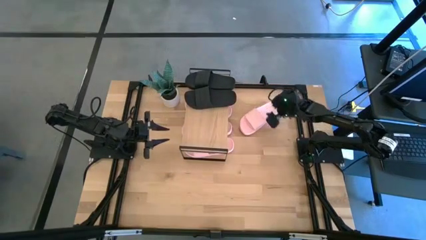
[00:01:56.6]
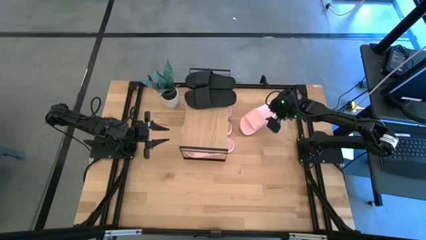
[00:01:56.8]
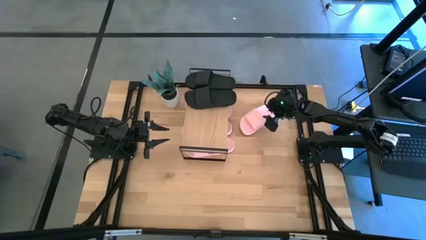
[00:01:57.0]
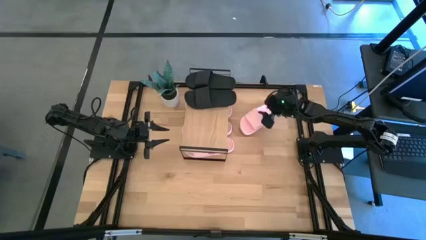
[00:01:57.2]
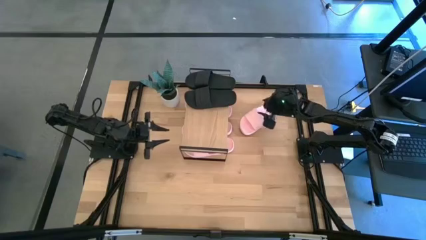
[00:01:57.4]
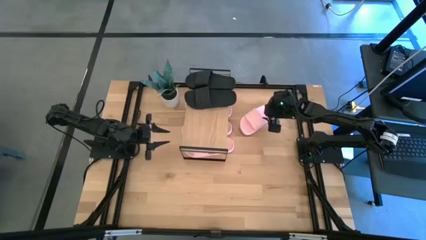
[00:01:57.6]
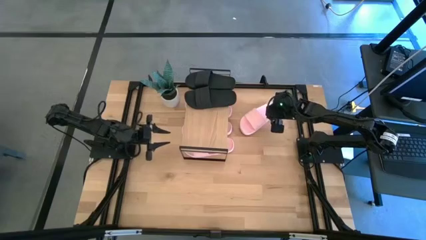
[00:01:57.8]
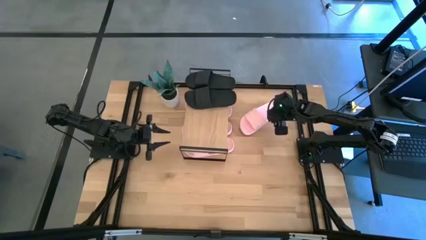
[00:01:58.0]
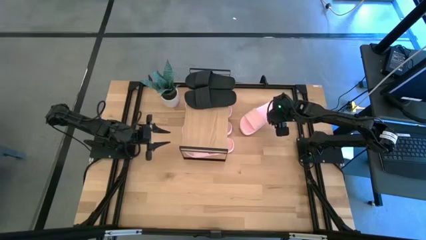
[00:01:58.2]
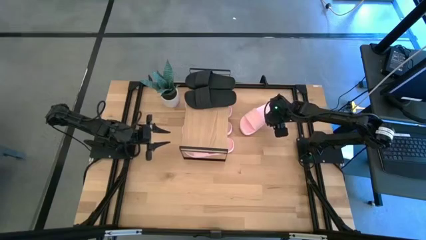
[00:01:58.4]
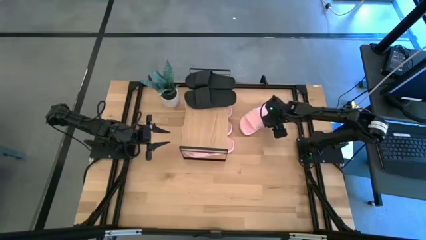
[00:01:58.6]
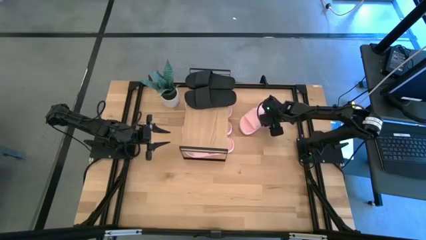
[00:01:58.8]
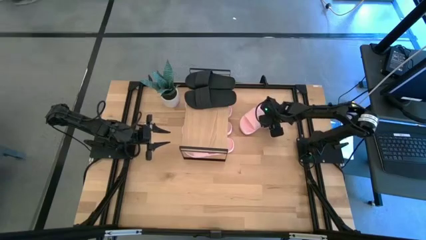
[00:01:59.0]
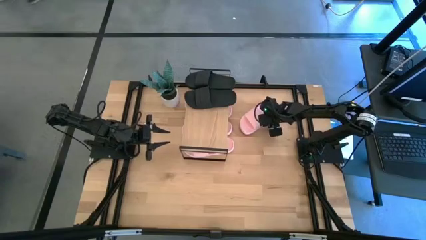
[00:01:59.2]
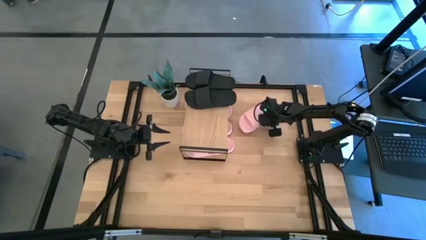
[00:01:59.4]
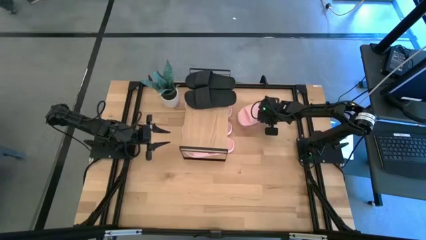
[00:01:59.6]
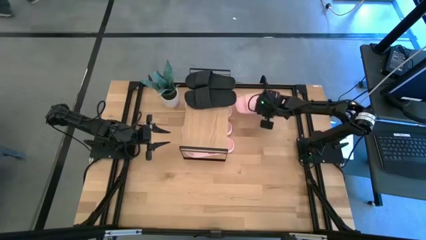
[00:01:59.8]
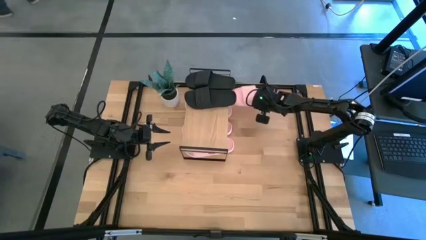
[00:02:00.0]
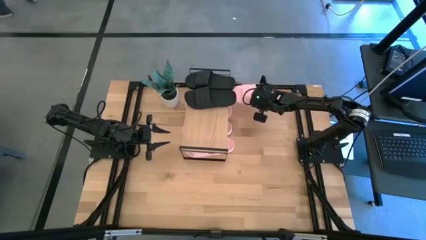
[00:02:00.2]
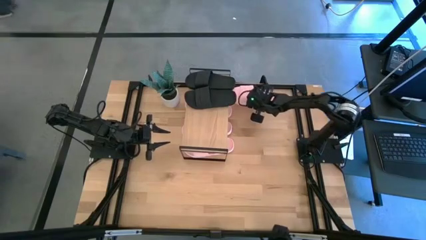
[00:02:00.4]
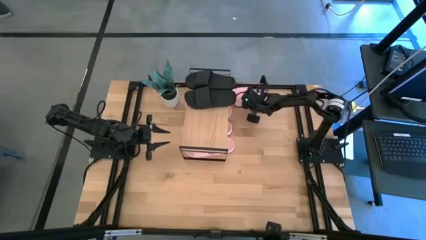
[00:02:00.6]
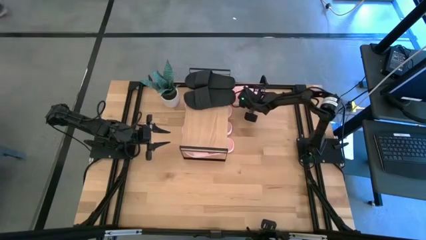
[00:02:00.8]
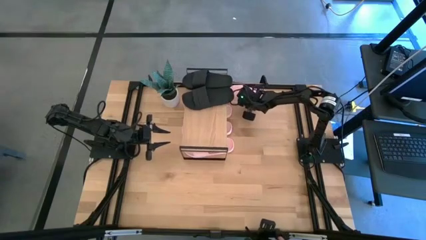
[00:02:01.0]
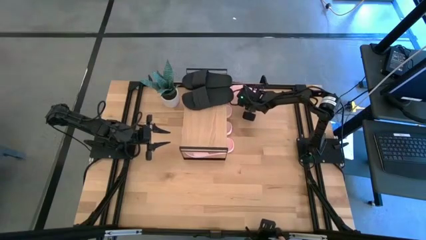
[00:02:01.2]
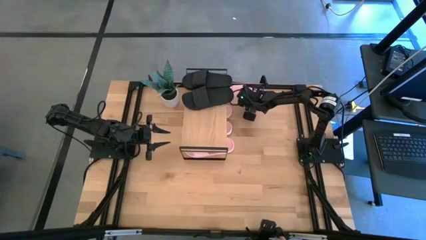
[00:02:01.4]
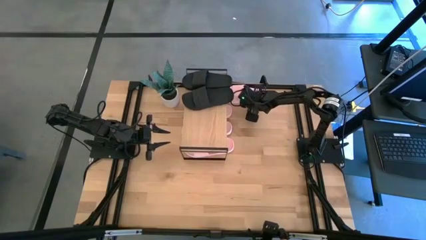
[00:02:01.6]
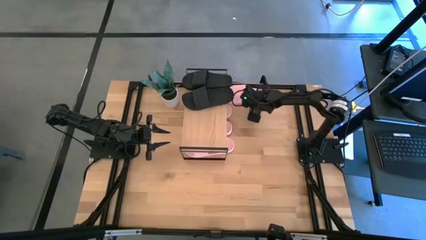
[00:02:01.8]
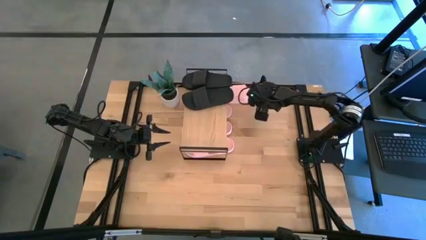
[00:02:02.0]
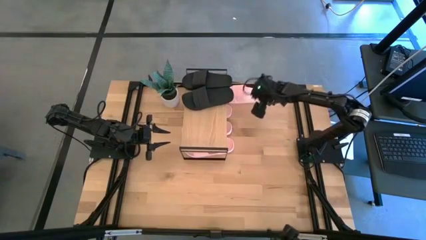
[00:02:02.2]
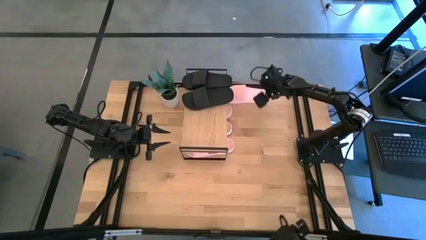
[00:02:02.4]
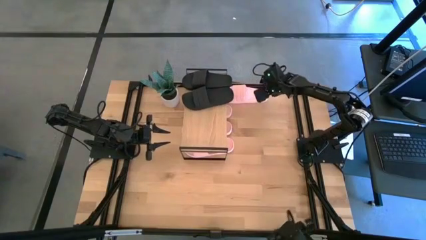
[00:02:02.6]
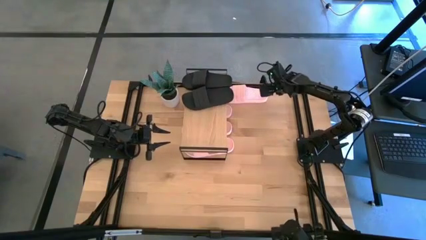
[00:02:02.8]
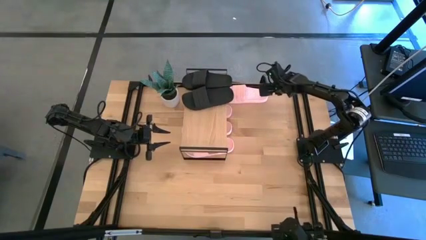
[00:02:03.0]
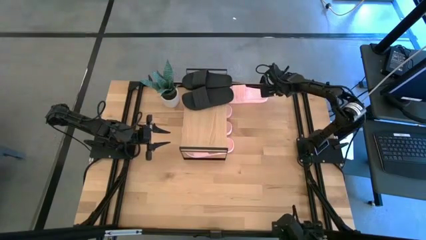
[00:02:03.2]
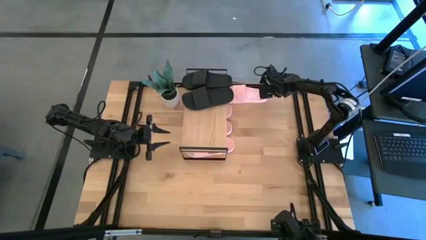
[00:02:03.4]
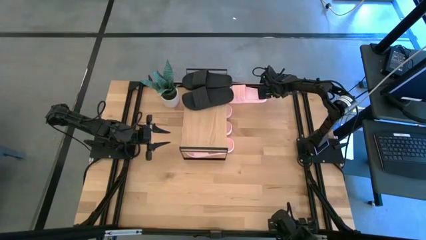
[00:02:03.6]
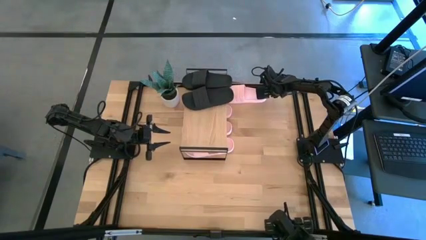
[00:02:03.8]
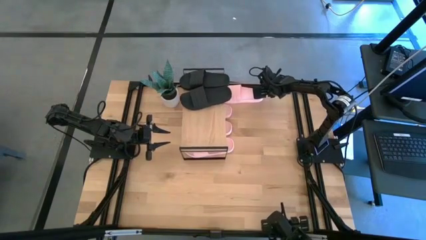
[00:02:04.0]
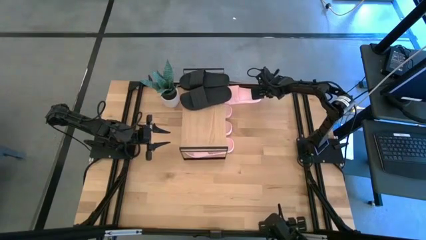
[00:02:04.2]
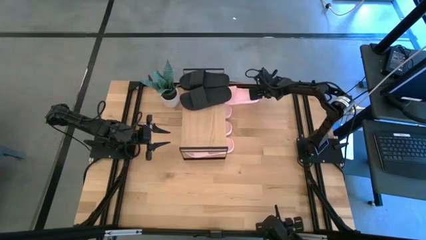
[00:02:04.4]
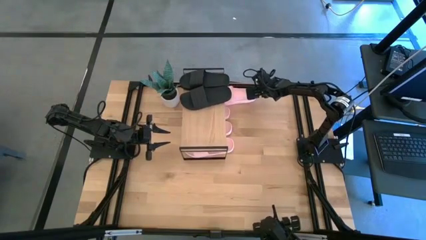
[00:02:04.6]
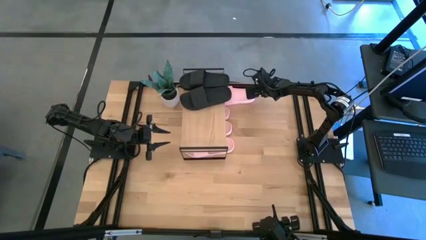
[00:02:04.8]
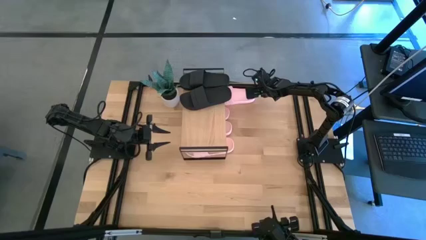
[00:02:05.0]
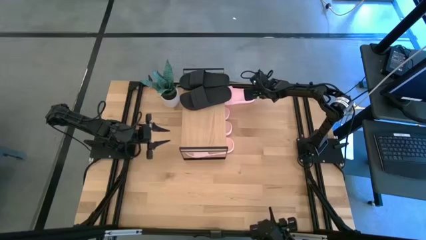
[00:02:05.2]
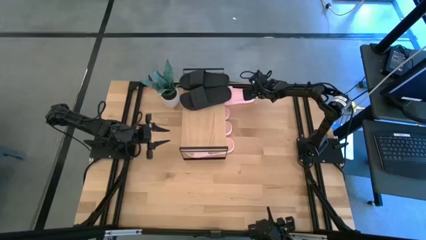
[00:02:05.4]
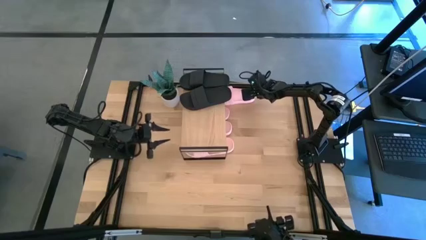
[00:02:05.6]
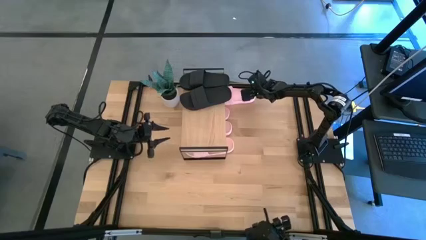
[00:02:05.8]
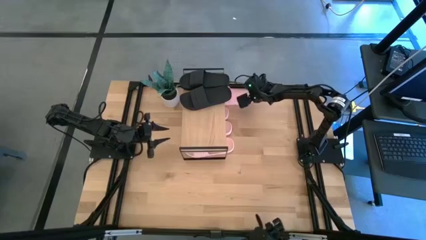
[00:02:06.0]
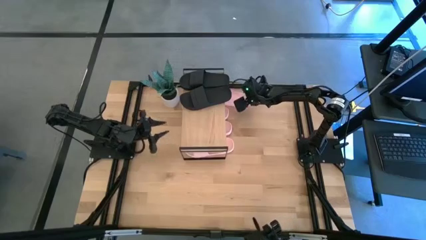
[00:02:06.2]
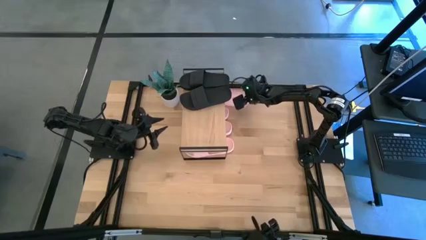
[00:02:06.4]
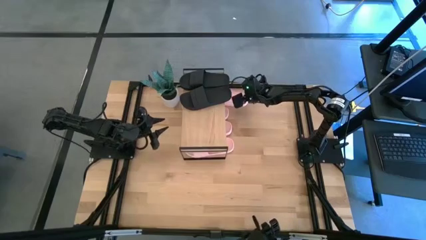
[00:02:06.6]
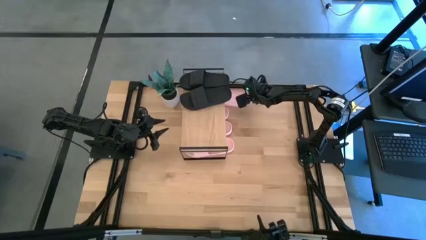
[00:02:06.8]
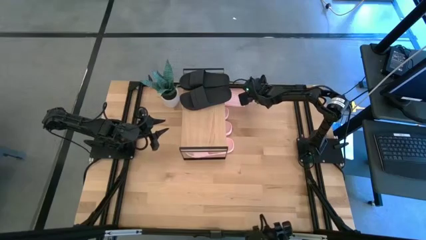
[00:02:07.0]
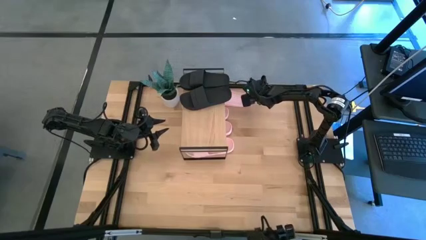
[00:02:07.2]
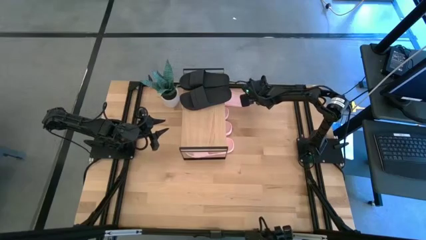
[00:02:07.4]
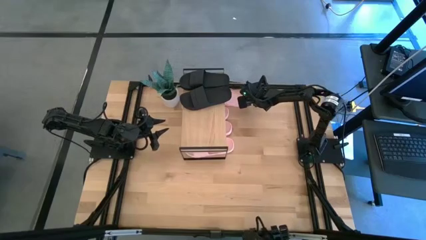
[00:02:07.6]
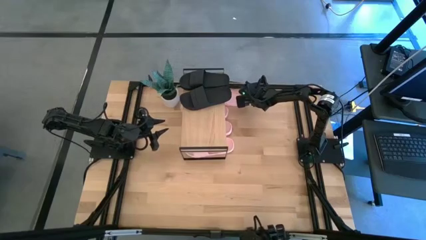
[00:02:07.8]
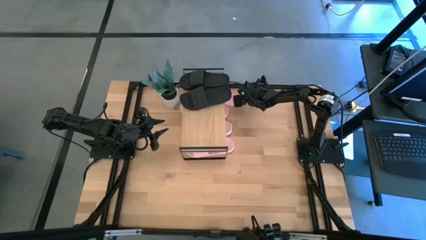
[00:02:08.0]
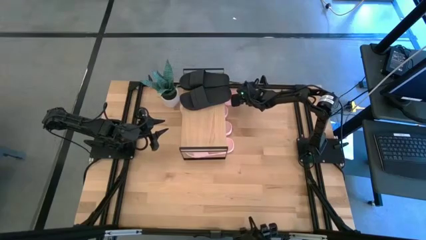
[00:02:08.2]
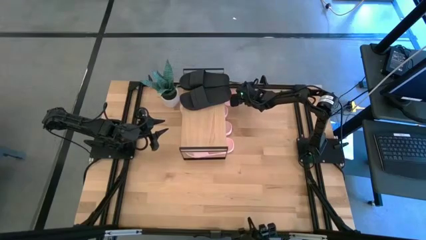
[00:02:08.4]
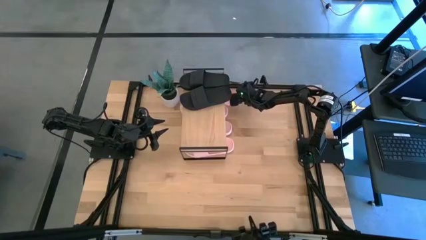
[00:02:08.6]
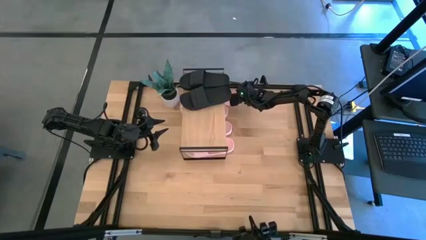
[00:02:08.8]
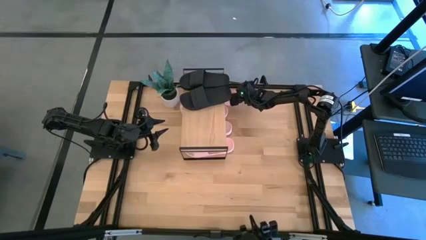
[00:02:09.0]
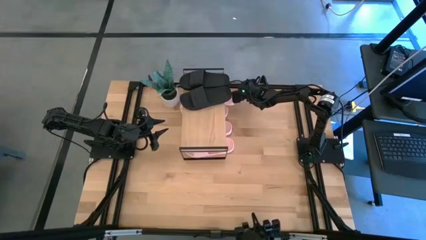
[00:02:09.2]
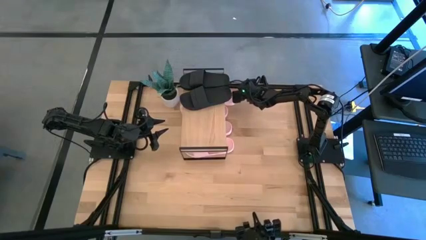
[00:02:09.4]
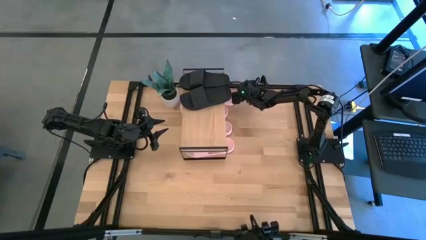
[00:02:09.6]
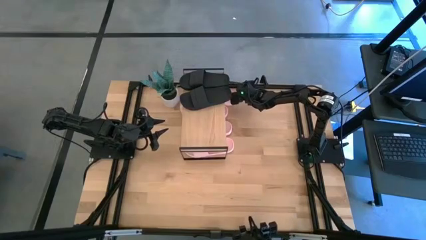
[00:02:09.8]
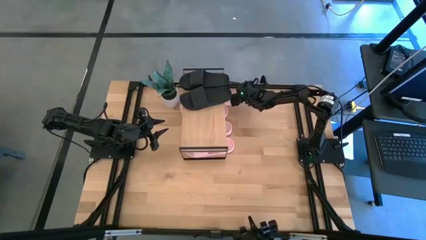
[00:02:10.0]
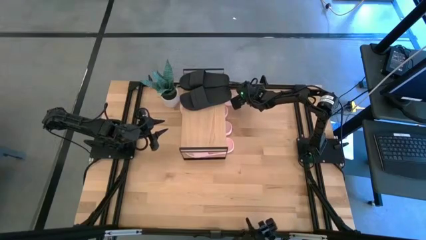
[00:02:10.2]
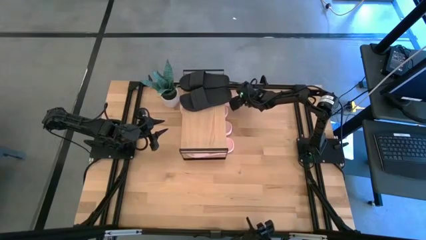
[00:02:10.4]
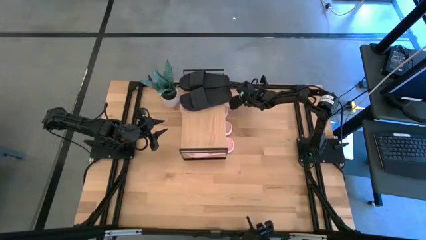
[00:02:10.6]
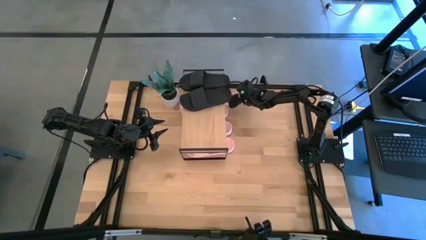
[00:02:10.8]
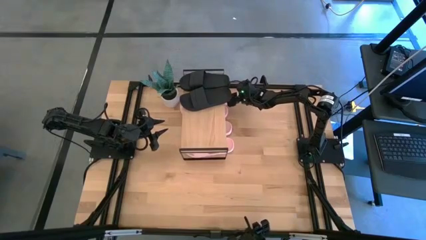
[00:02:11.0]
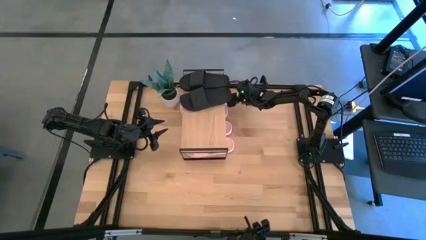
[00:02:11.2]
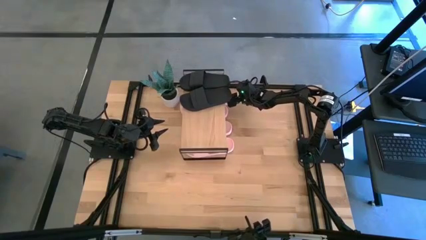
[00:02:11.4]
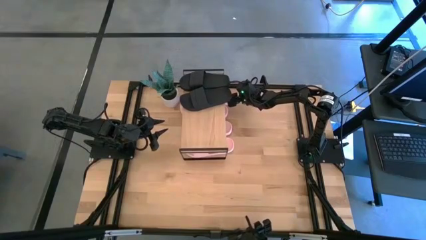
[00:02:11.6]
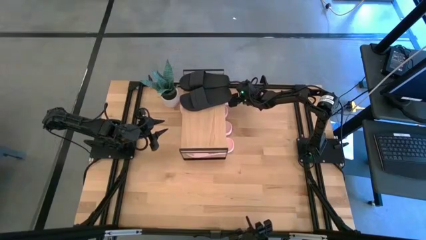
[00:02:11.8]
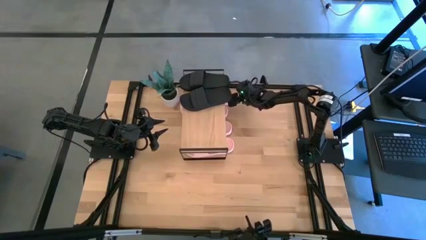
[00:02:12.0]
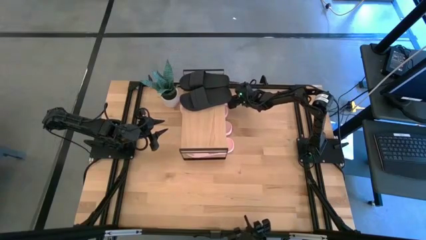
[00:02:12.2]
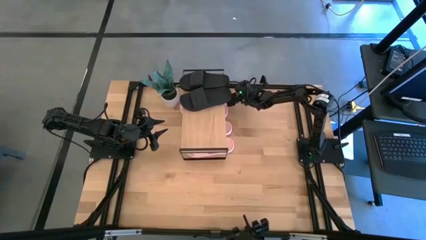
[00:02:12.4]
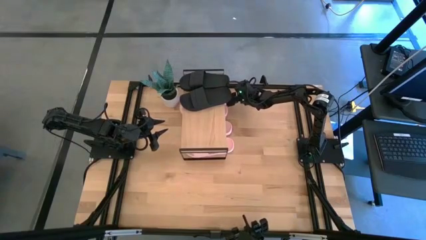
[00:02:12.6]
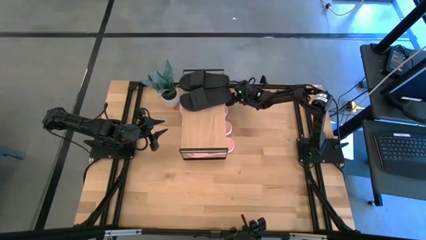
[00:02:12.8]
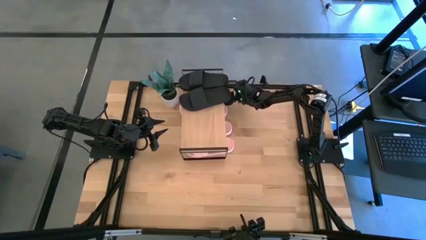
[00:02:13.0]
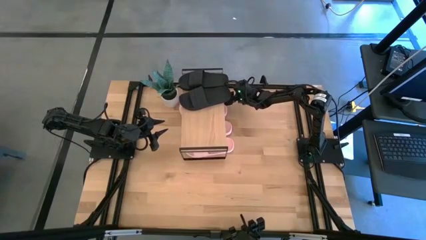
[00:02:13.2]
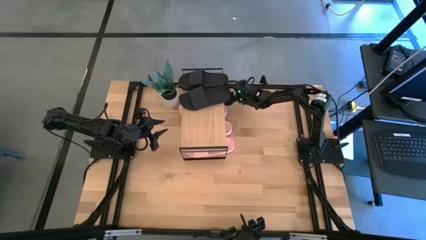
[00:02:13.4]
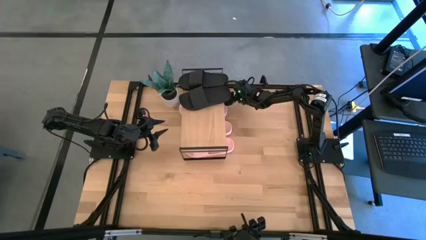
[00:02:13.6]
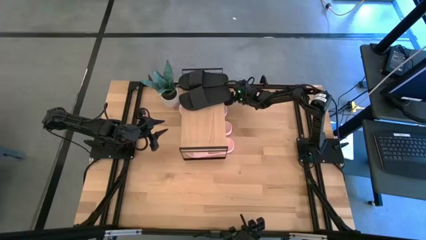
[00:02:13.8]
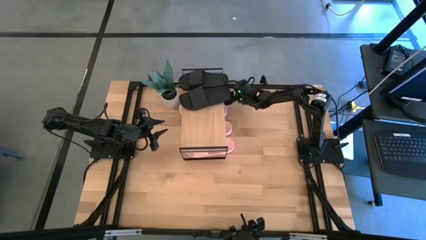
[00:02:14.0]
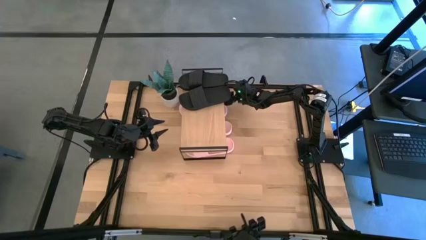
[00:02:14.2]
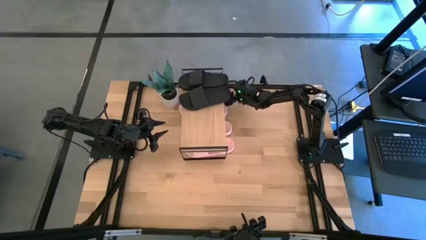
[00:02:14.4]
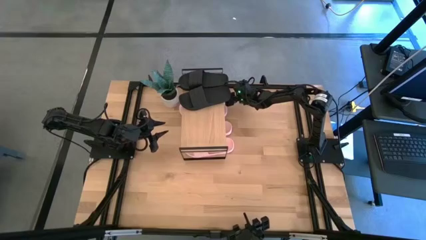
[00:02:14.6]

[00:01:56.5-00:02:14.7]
Task: Pick and place slides into the shelf
Put the pink slide under the shelf
